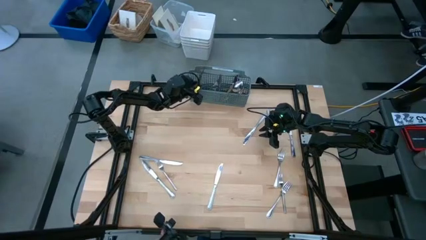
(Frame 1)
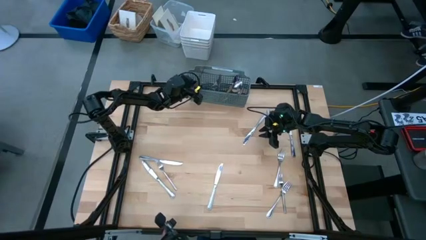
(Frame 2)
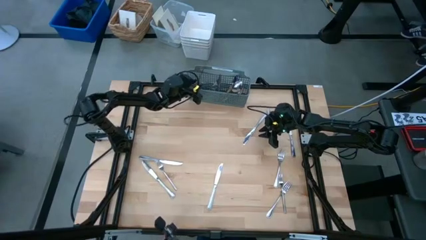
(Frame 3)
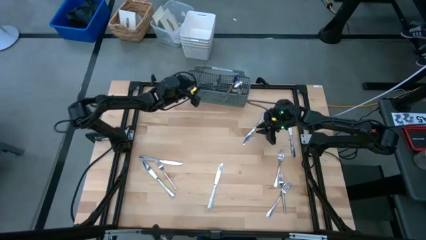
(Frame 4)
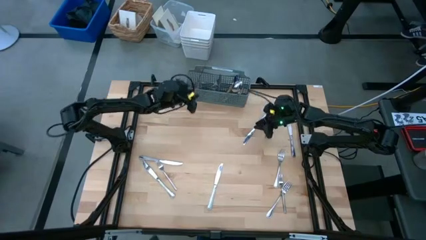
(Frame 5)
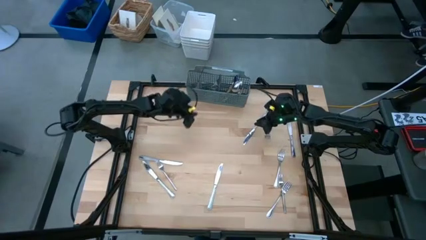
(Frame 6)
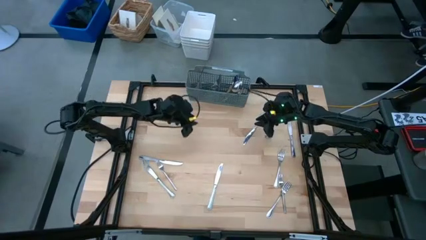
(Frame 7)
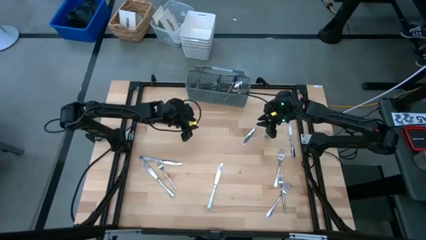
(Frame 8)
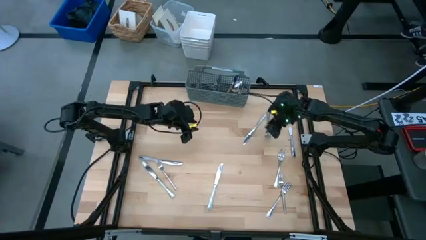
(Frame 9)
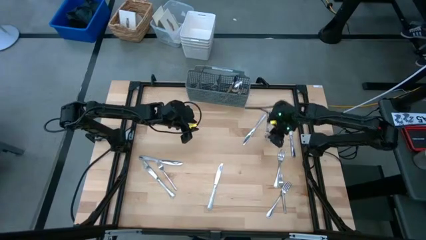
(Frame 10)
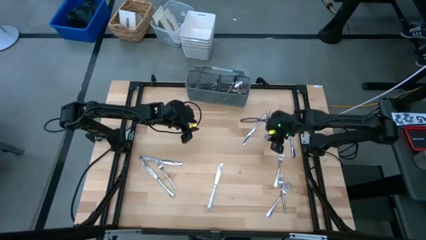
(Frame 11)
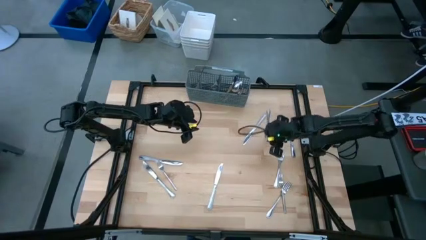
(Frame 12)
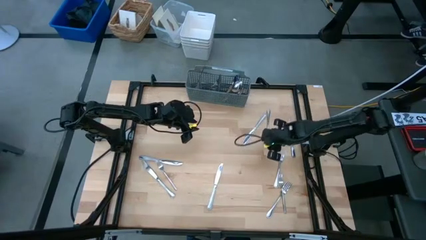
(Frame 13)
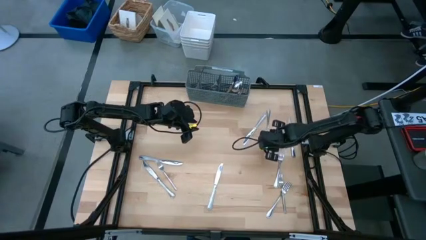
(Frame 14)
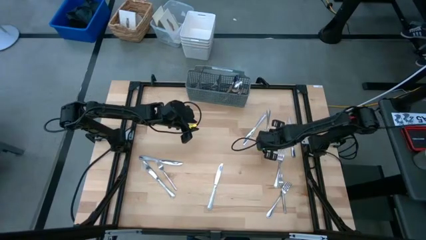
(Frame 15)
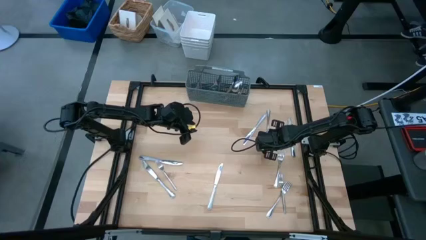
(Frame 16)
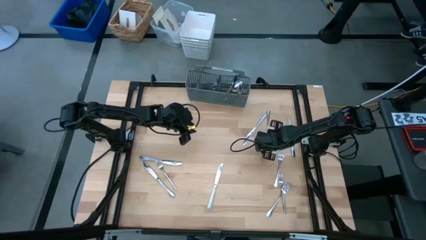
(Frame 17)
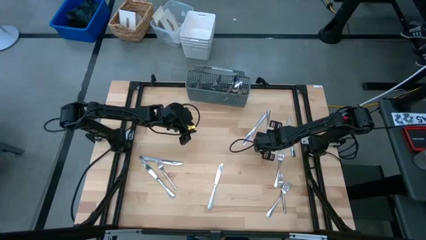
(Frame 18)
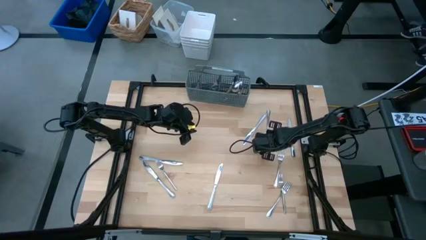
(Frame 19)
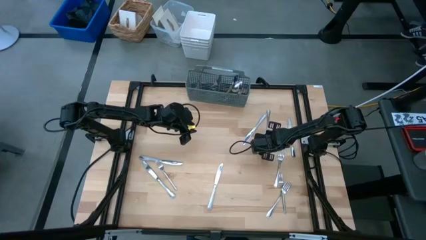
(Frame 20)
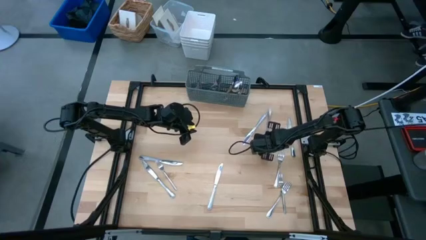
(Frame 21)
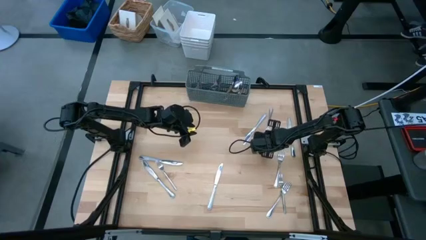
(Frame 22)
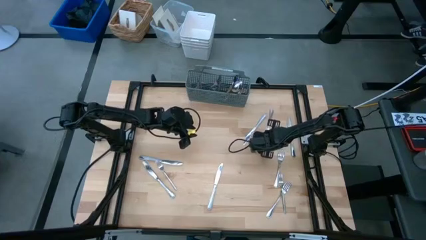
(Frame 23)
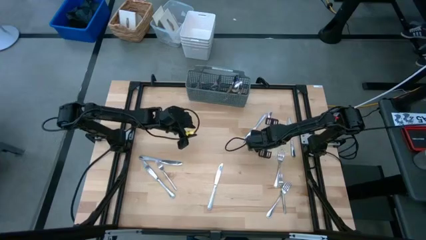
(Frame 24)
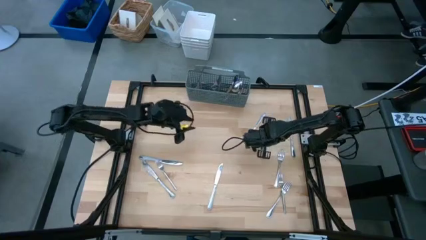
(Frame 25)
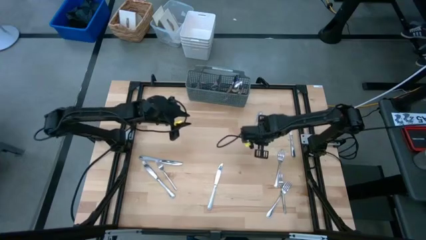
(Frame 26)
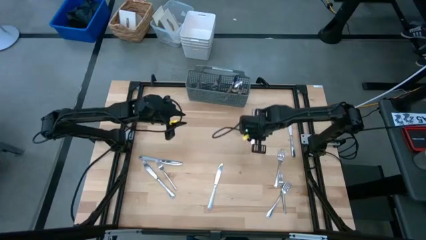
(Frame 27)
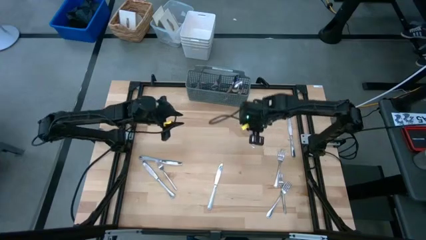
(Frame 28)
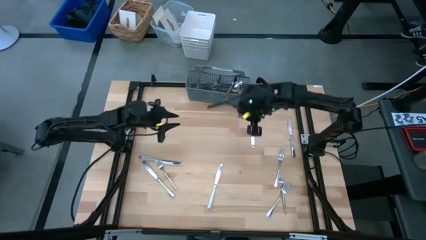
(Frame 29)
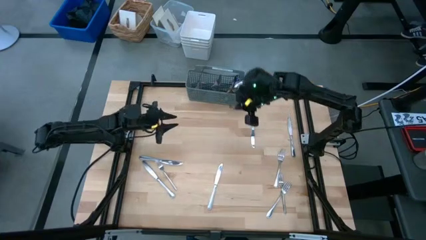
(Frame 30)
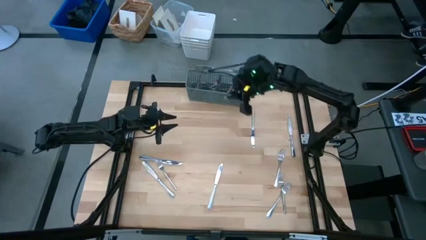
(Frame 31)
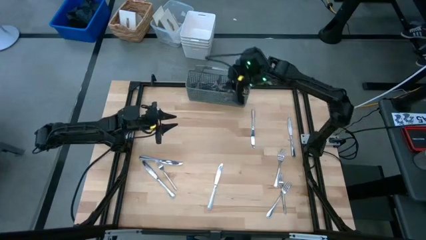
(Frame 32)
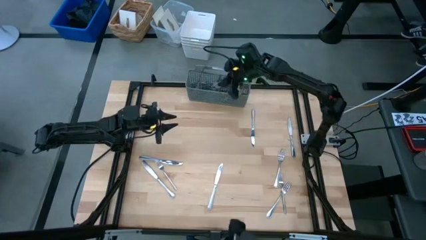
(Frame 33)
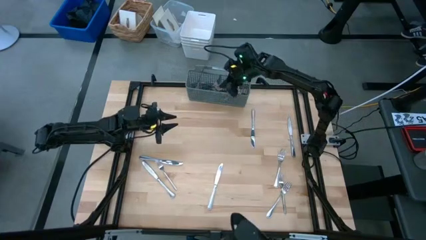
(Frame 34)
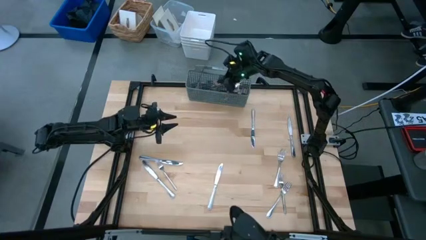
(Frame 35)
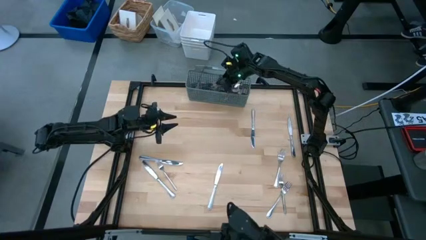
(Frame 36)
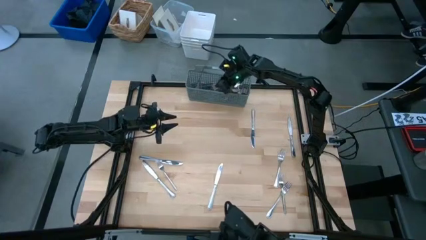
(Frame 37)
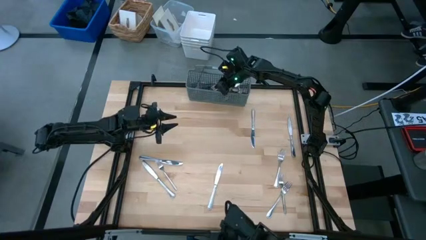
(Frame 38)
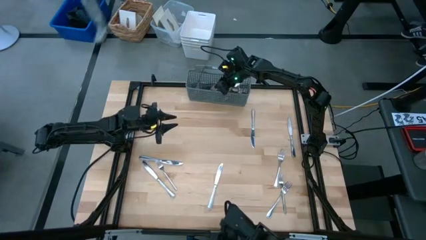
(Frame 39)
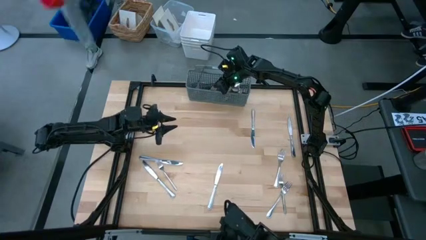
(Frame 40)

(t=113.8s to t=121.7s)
Task: Sort silverware
Put the fork into the gray silverware organizer

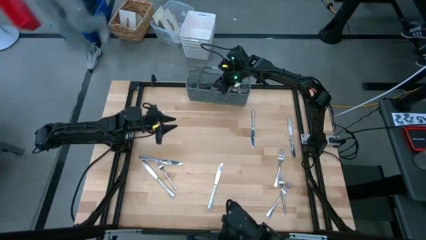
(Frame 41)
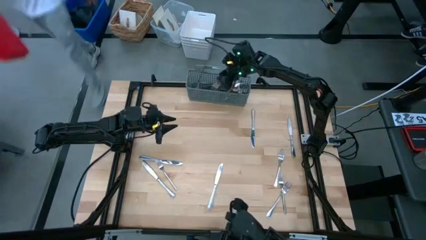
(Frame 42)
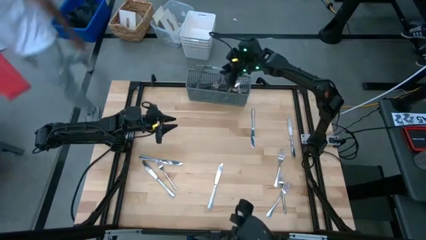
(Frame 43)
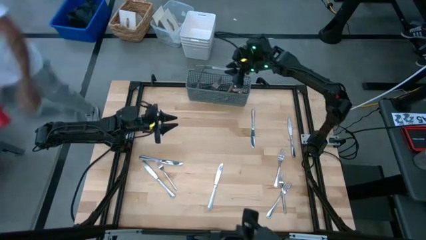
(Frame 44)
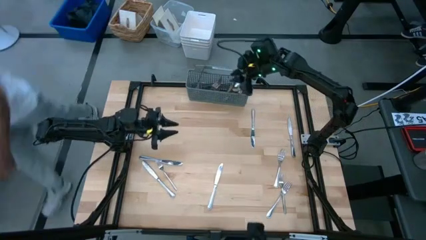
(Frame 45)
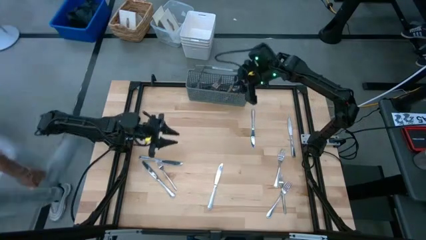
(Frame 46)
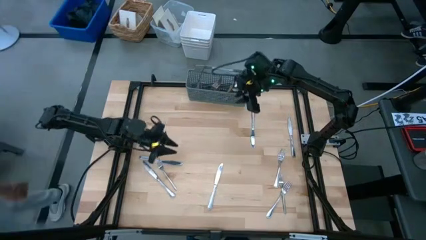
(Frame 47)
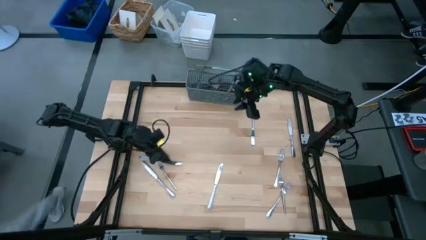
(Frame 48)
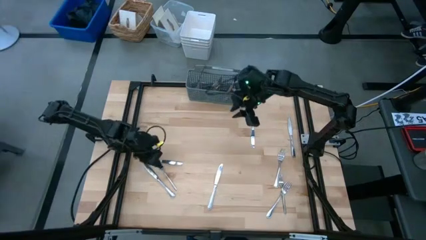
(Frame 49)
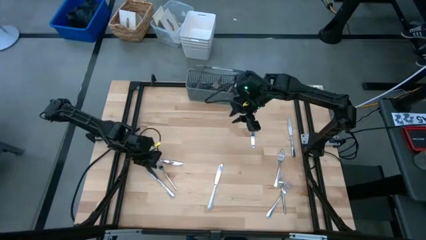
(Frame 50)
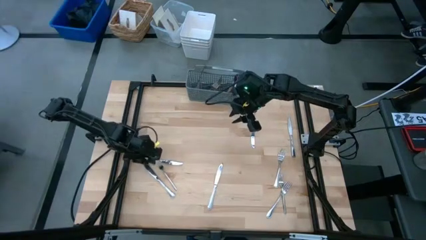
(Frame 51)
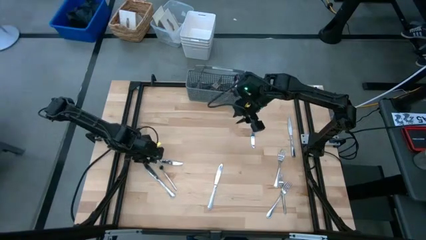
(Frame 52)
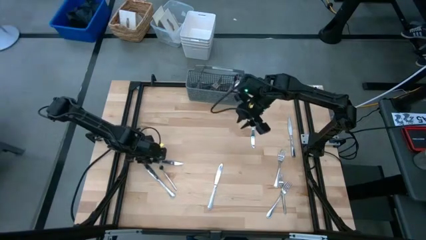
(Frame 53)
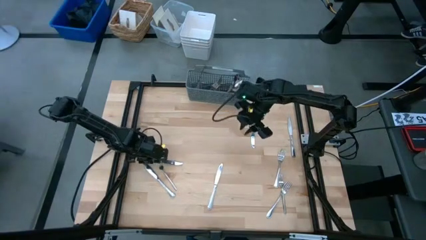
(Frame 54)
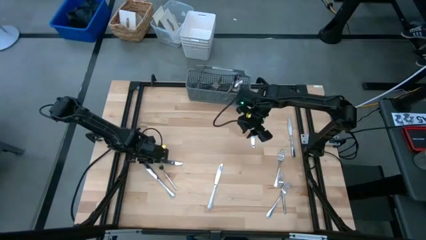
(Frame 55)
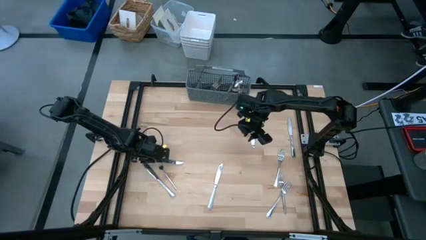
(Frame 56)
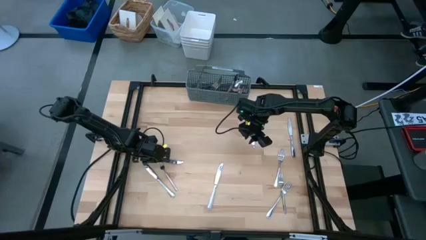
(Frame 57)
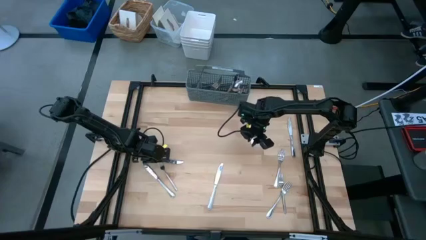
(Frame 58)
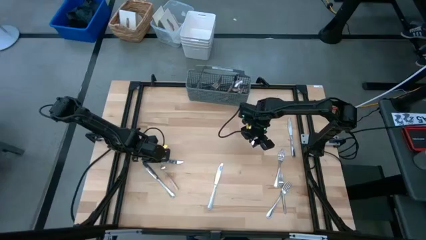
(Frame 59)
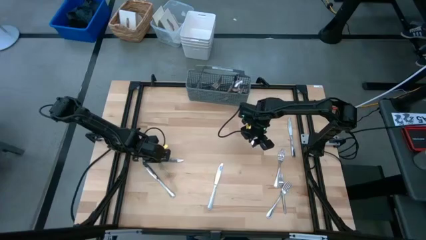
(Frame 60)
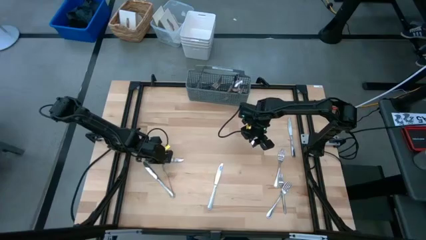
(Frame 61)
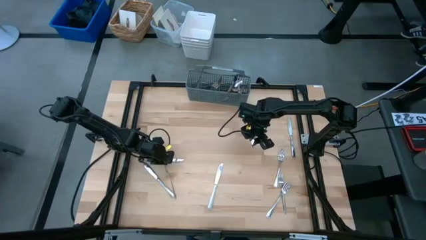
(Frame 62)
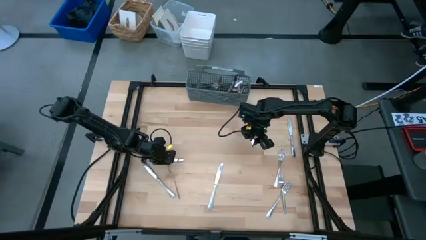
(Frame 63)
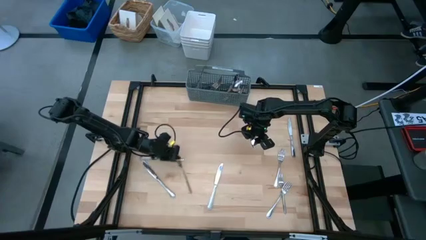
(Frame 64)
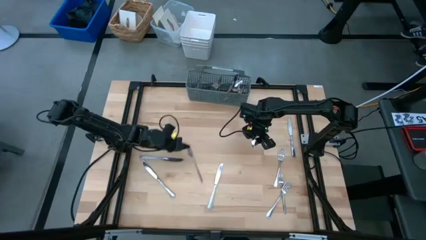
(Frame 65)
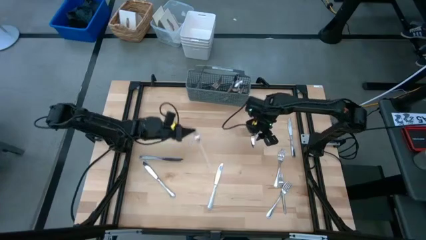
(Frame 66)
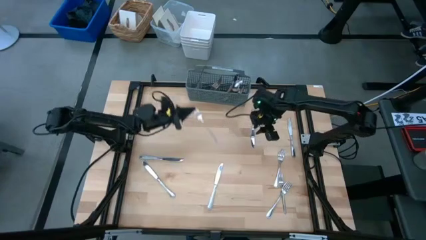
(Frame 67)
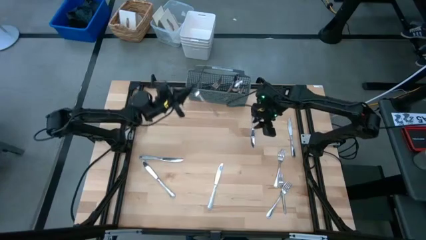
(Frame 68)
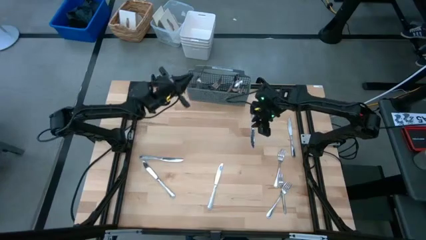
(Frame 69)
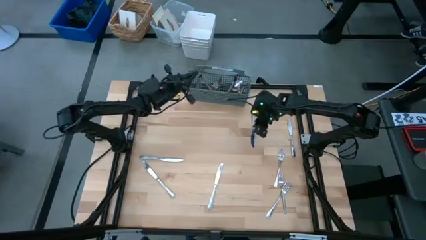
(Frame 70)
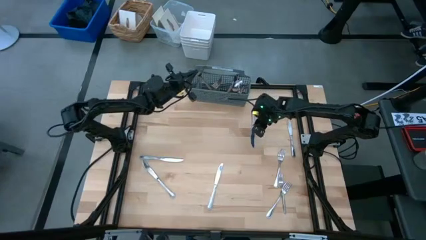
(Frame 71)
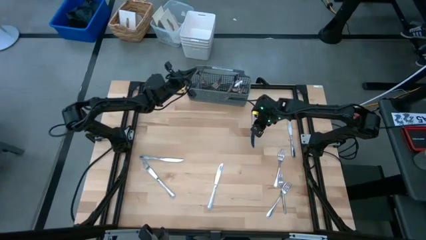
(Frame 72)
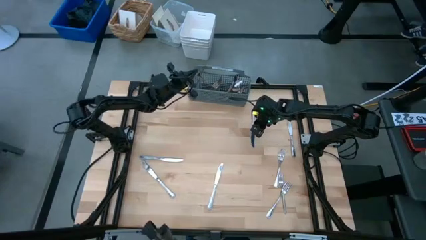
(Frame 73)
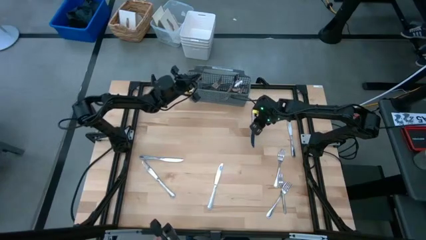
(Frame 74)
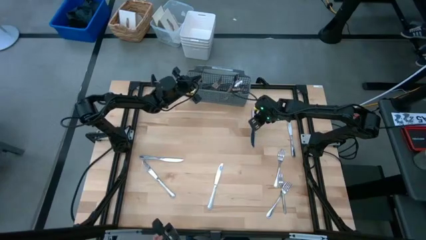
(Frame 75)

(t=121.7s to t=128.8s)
Put the fork into the gray silverware organizer

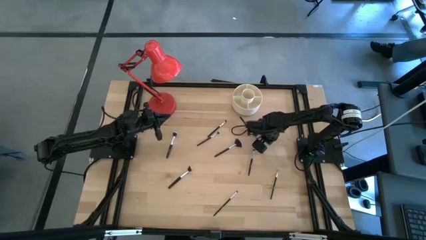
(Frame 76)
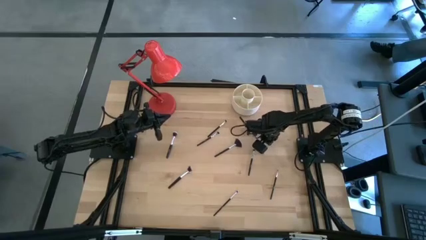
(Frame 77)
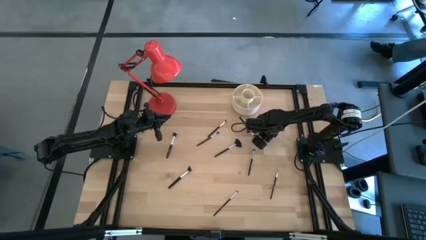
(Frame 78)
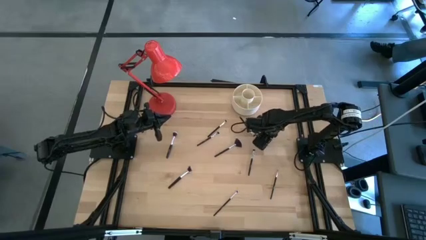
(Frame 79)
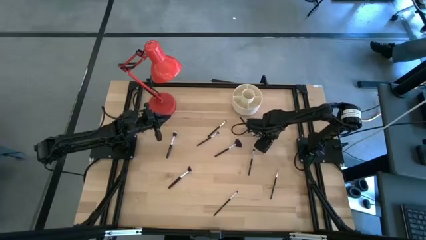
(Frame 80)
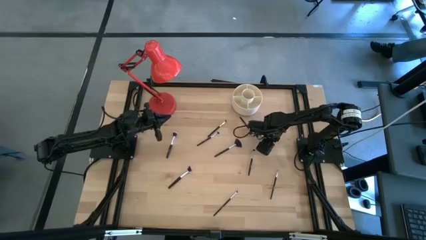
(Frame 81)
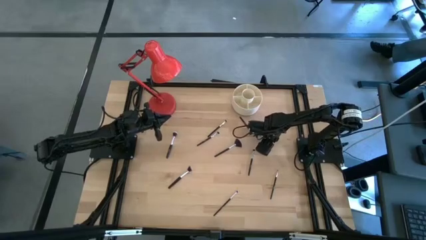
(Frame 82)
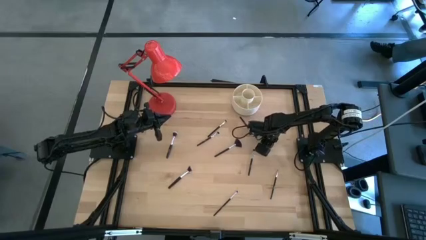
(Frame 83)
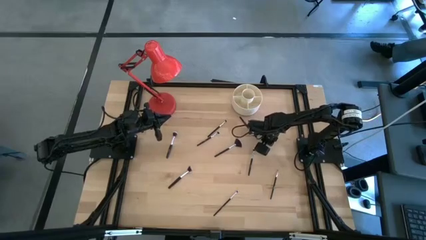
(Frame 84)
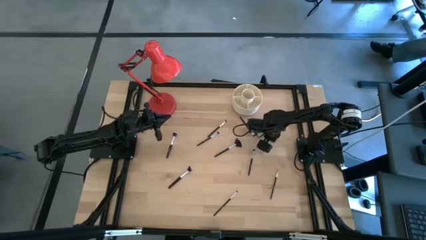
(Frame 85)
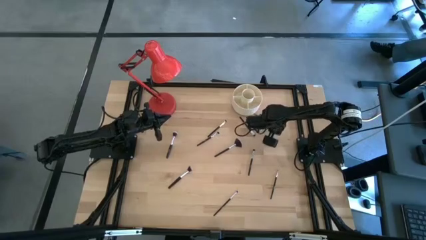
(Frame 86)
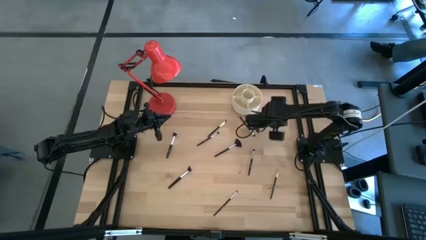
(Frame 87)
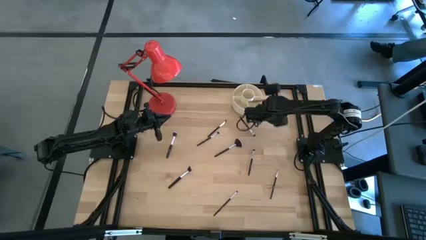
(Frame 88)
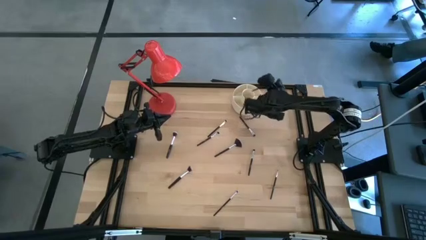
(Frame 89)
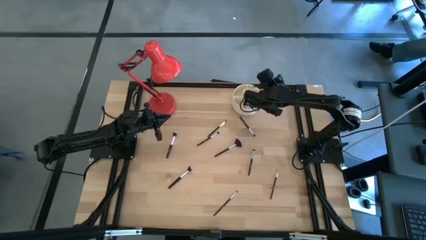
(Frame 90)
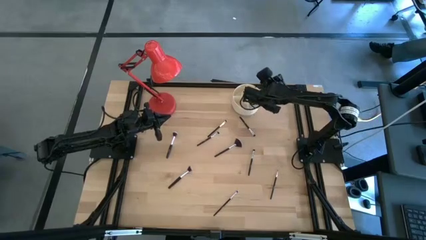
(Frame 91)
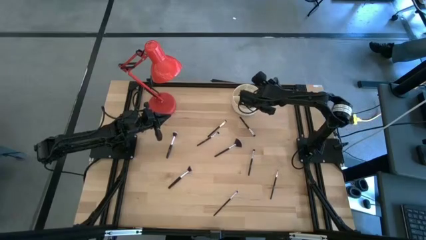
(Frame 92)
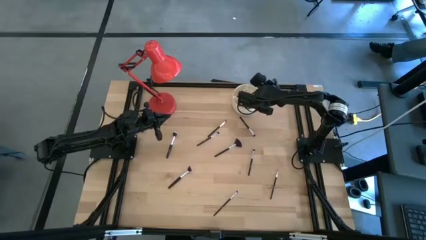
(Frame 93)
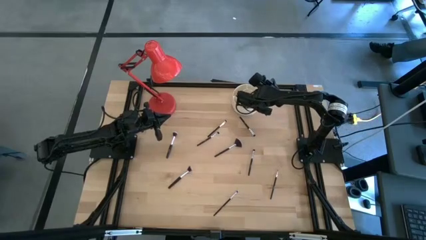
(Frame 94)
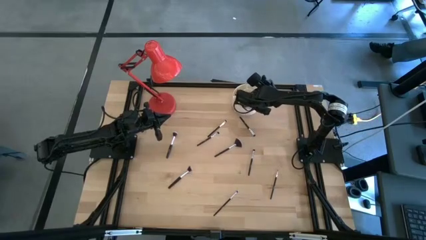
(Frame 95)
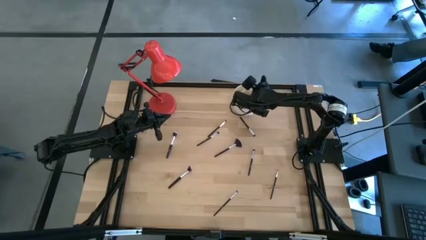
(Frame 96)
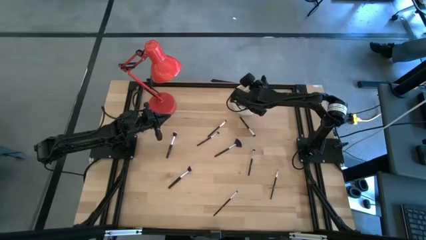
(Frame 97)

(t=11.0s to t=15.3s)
Task: Put items in baskets/containers
Put the black eyeshadow brush into the white organizer
